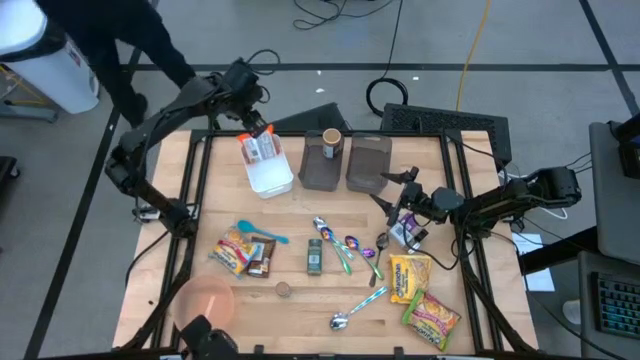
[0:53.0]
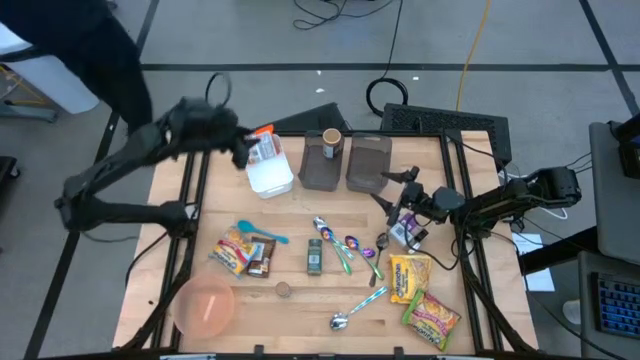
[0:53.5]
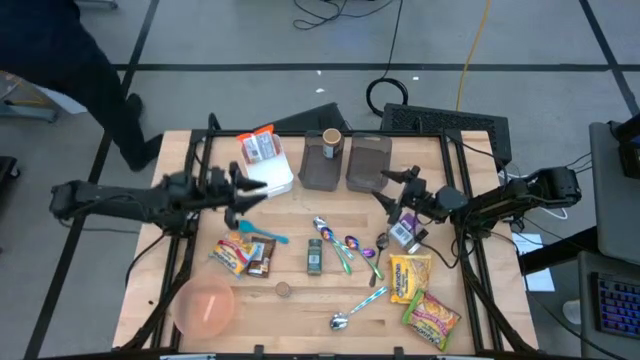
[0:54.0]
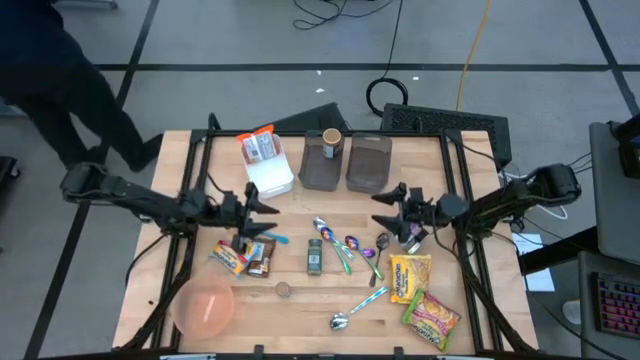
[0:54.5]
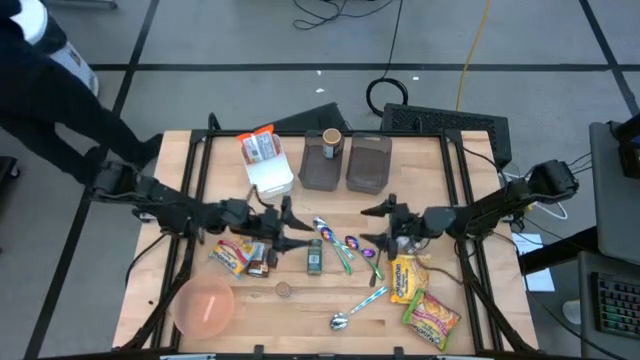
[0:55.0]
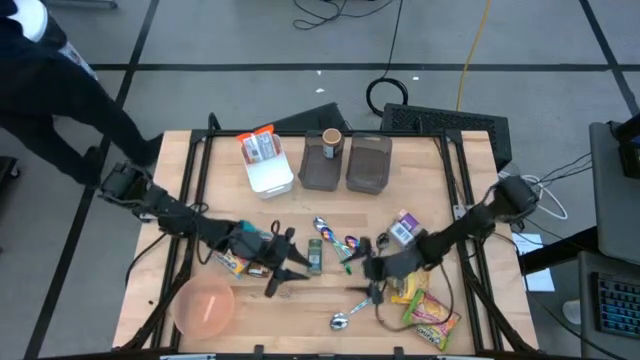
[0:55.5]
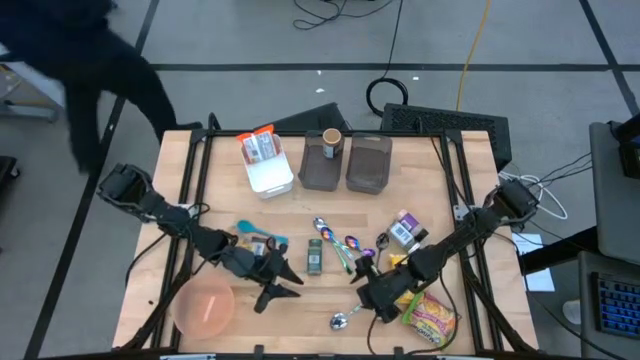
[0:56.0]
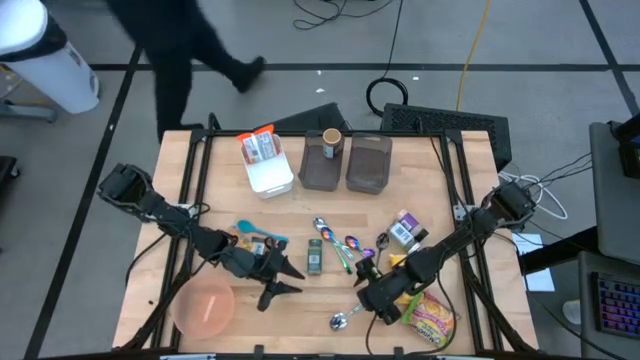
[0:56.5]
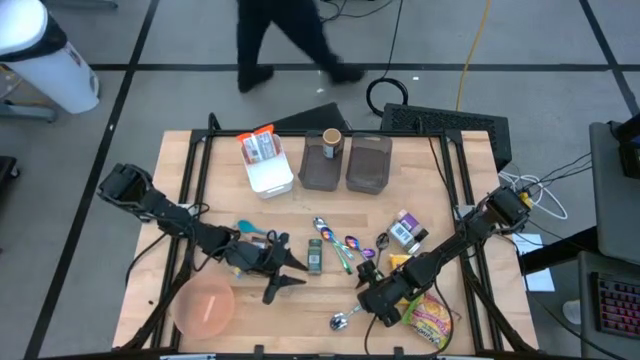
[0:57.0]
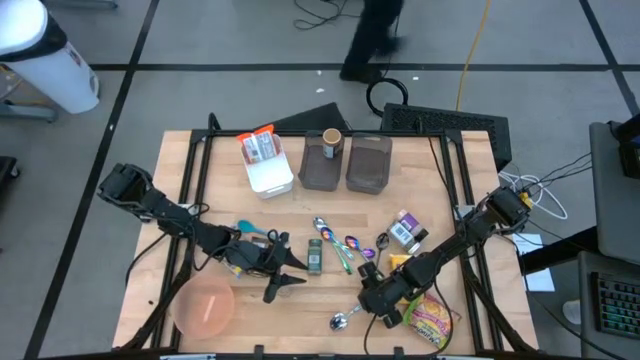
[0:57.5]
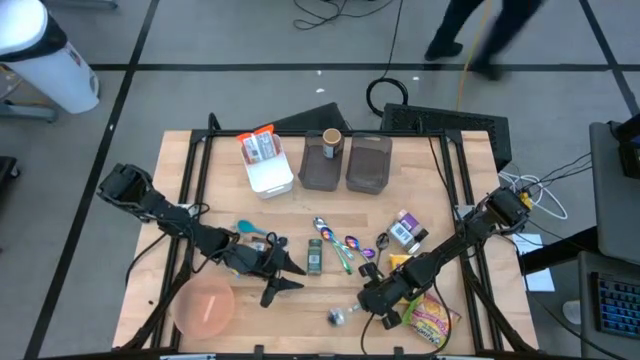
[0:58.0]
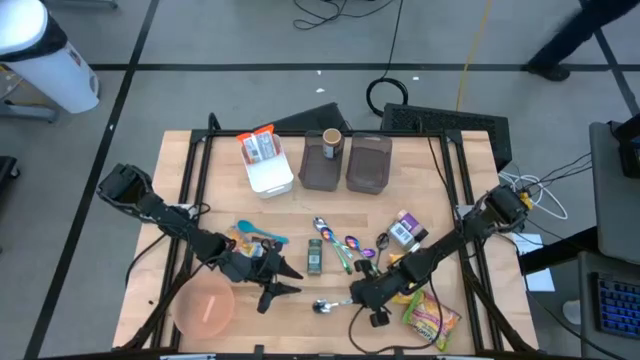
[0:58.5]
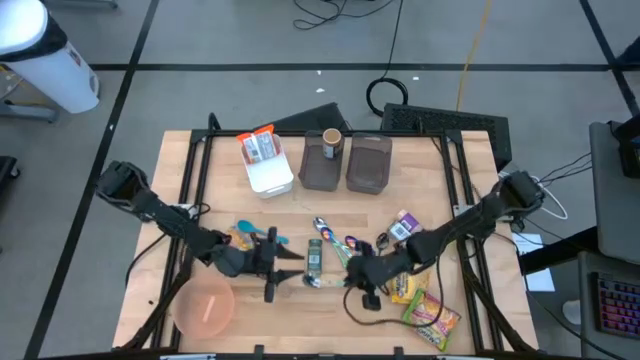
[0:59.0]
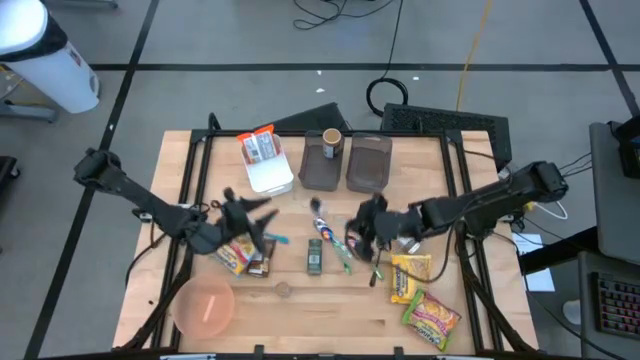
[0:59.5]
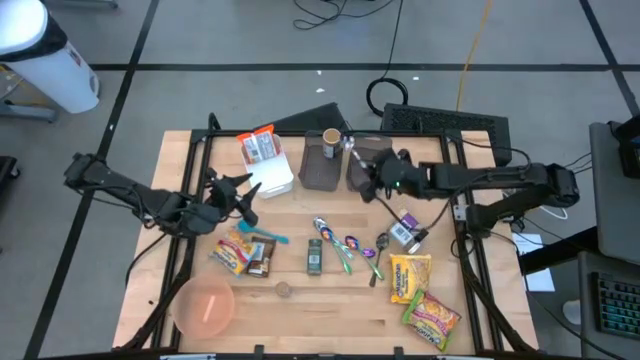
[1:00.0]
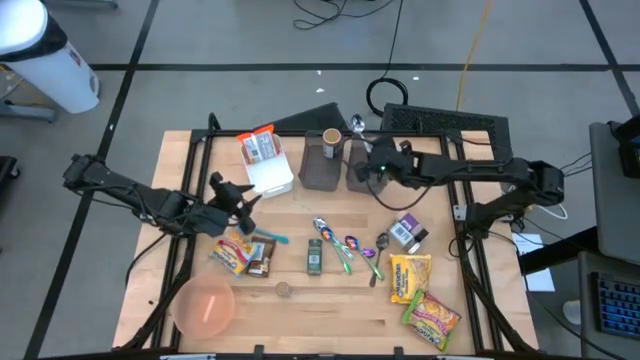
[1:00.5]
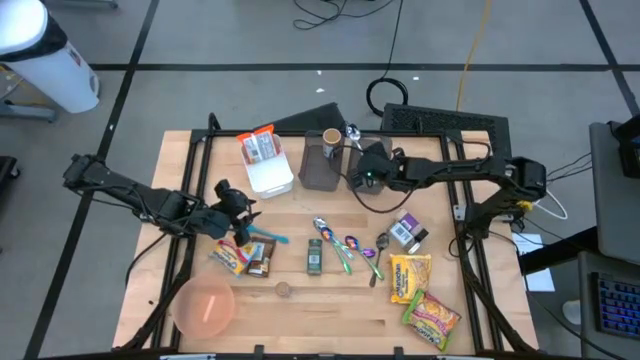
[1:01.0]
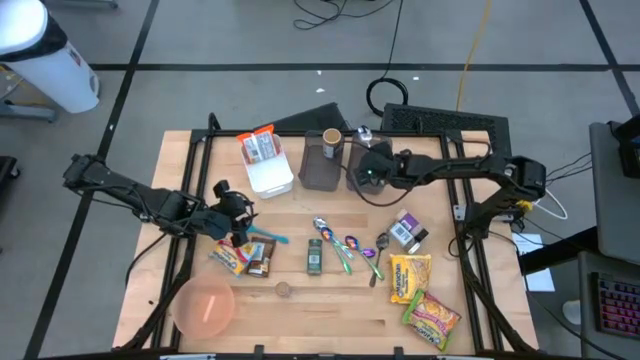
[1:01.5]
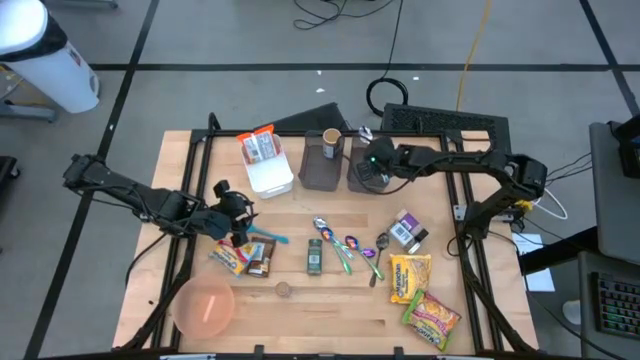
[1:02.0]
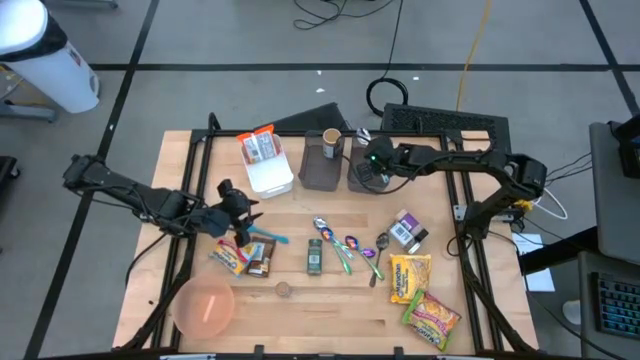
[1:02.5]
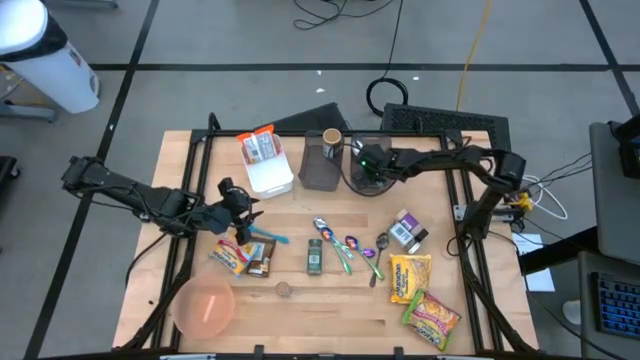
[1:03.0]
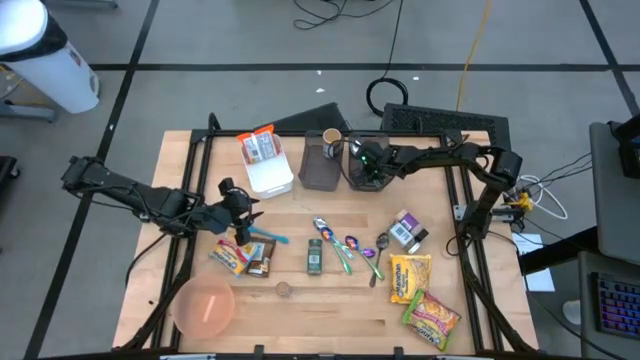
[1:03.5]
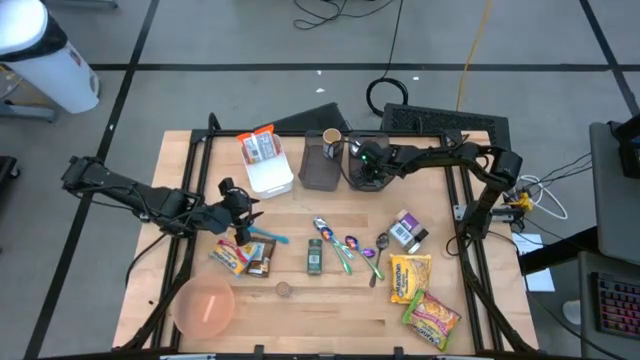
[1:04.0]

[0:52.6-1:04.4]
Task: Pick & Place Food Item
Put the bottom blue patterned spoon into the right black bin

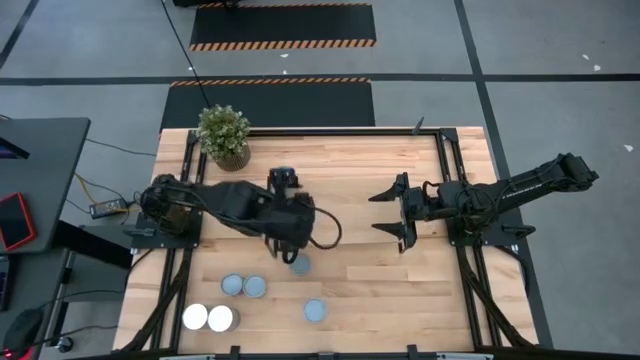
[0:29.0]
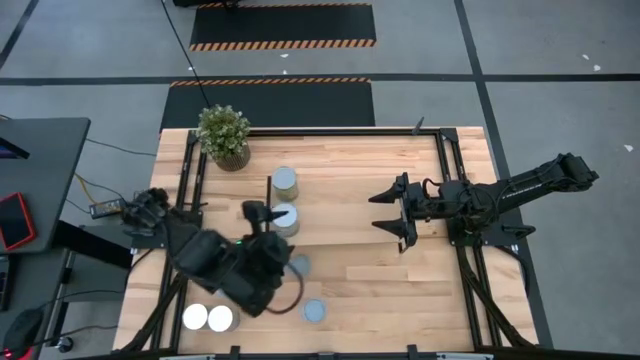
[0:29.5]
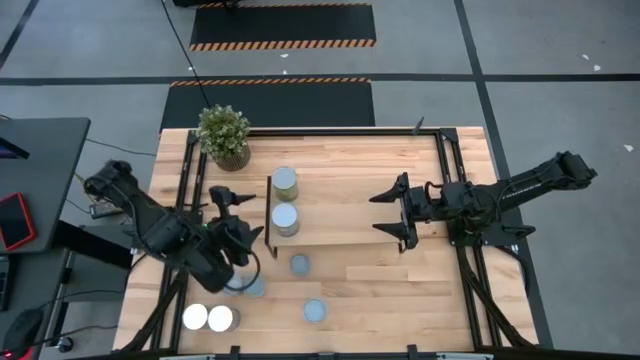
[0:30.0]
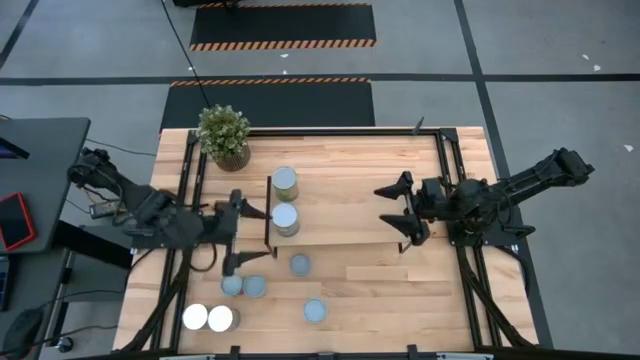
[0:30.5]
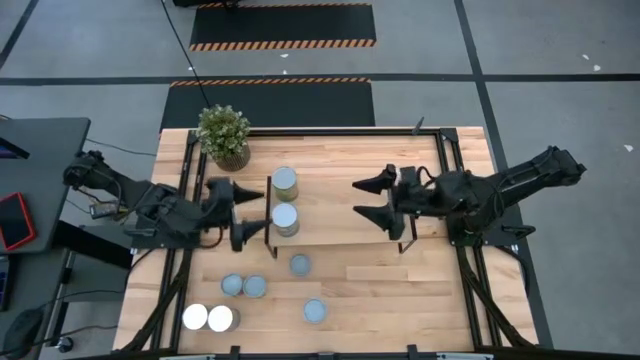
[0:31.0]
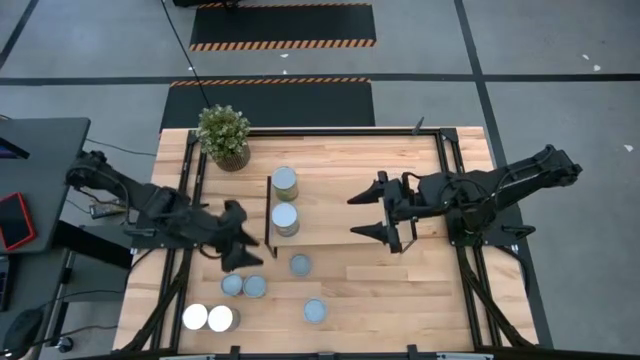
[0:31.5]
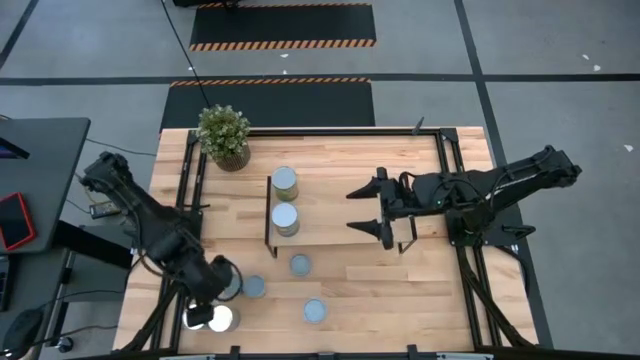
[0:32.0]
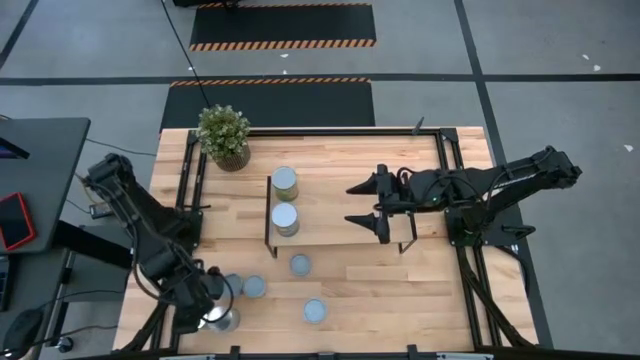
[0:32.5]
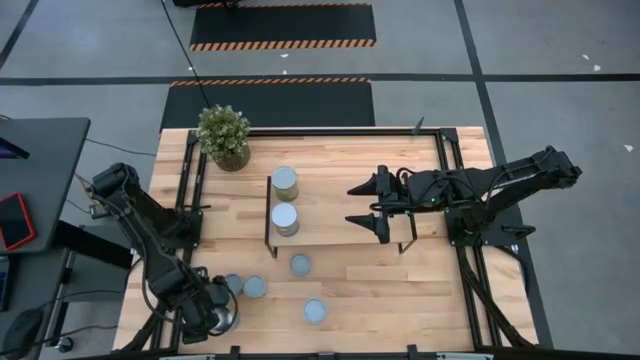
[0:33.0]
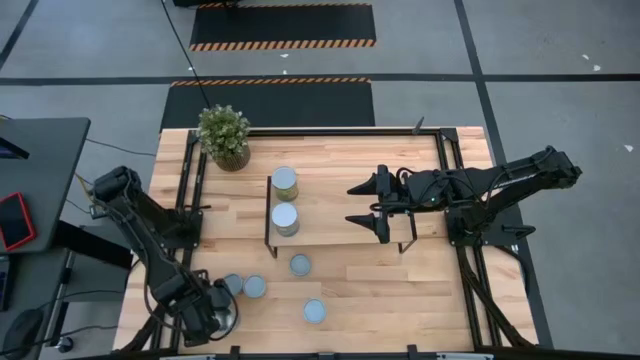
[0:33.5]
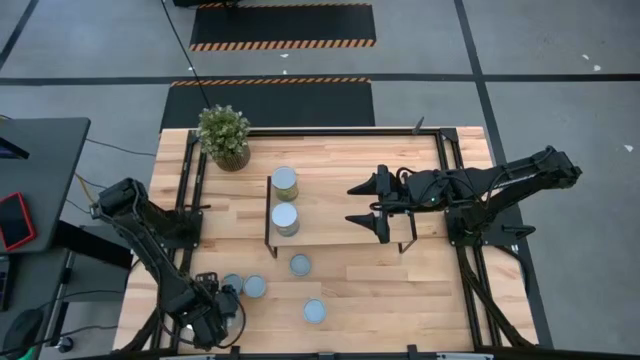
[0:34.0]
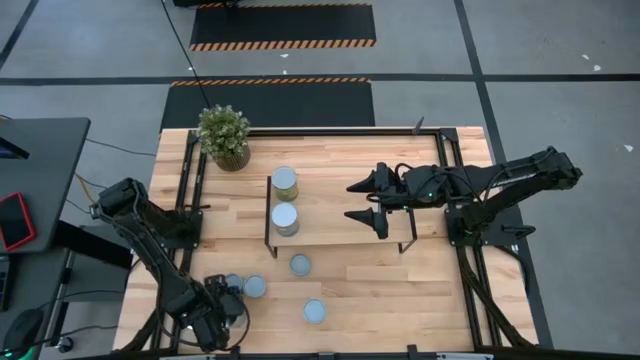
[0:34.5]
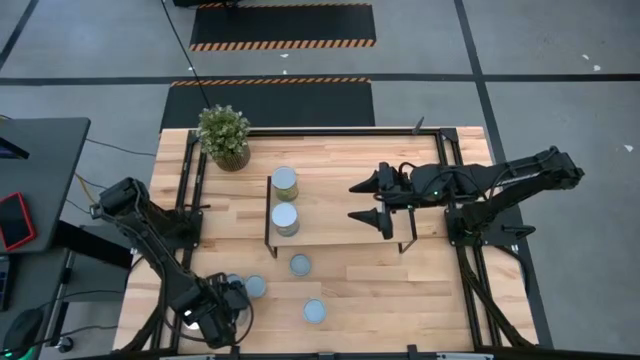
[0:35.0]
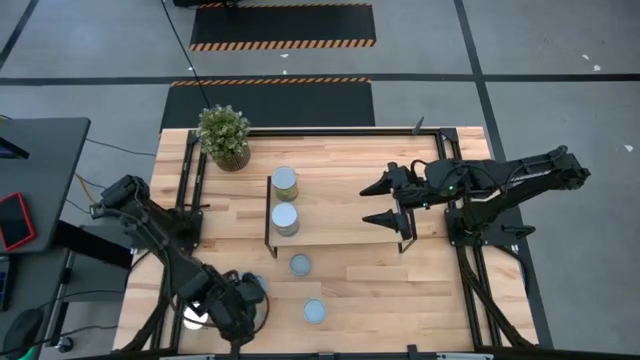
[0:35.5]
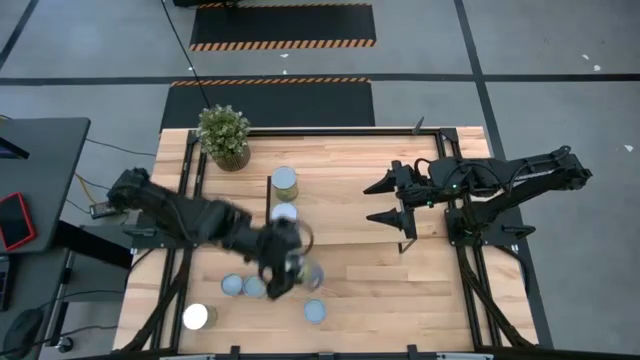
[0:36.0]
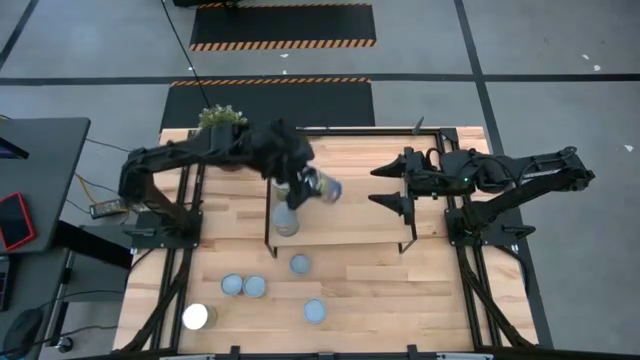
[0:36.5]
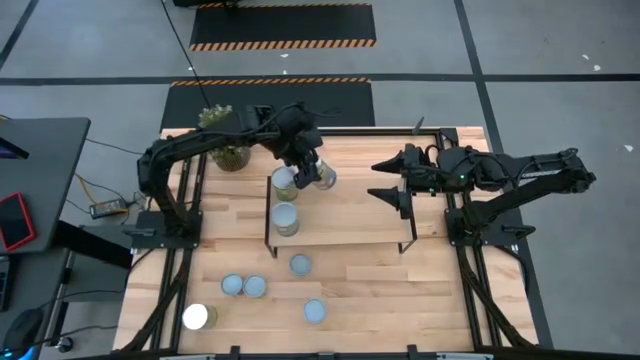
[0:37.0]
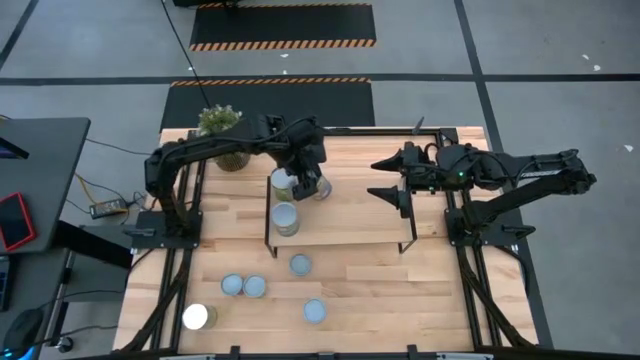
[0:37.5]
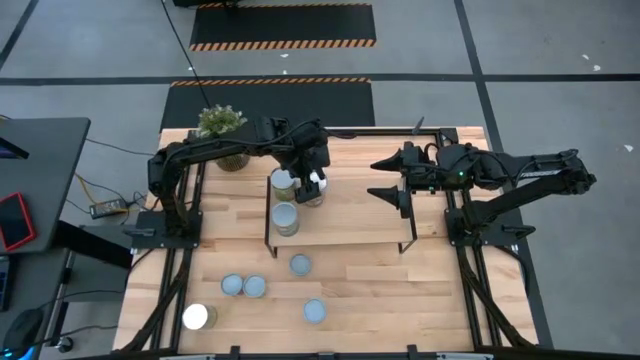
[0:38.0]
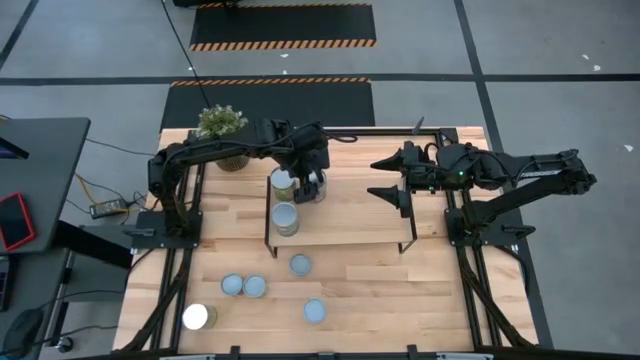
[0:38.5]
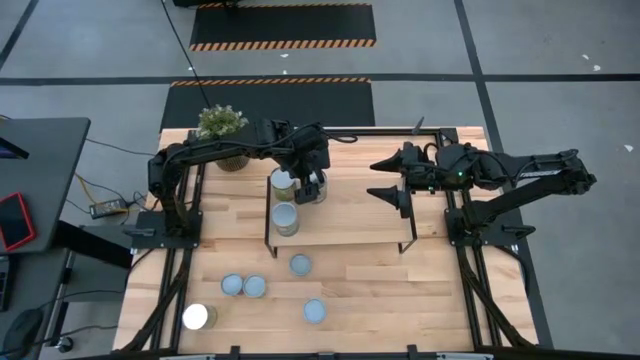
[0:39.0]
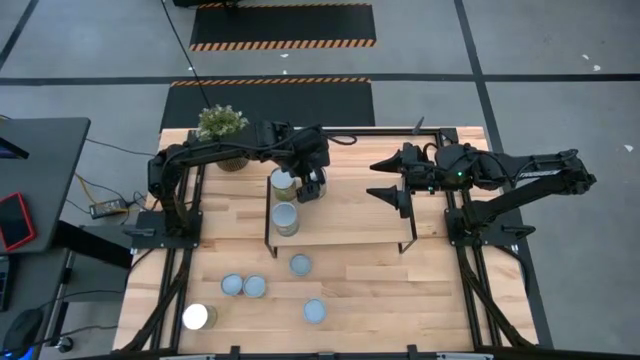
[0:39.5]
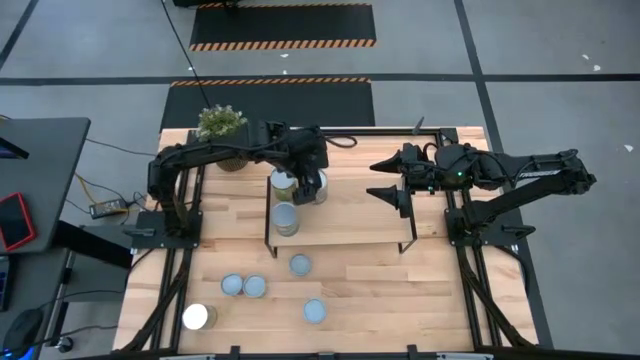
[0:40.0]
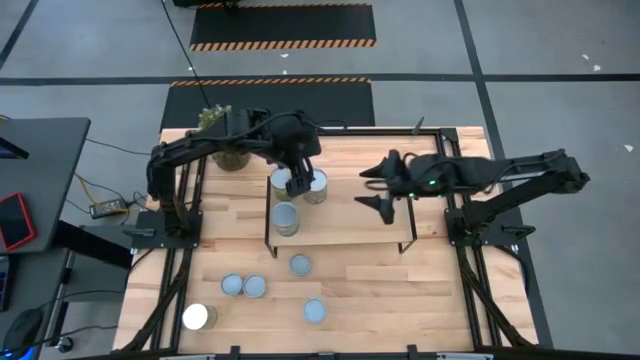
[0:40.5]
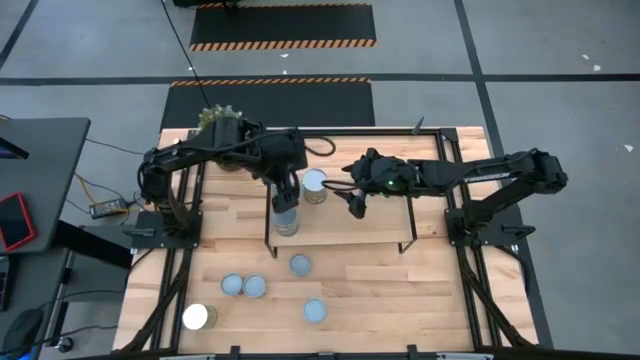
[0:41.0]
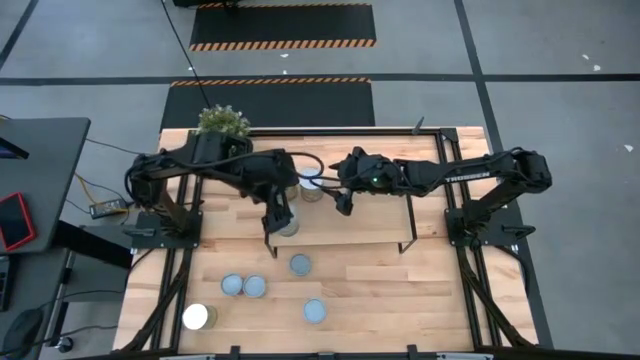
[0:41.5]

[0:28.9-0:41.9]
Task: Pick and place cans onto a shelf
Put the canned peaches on the shelf
